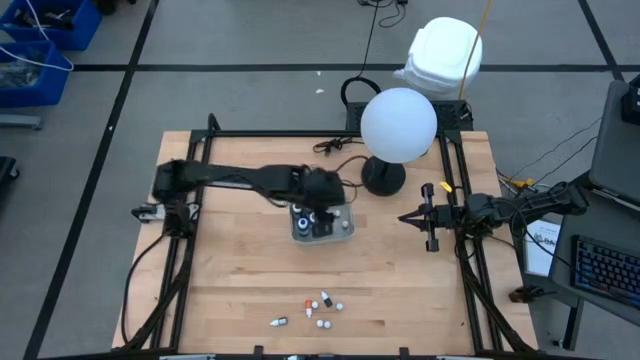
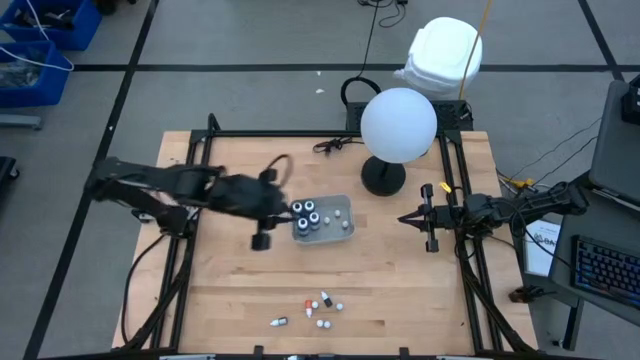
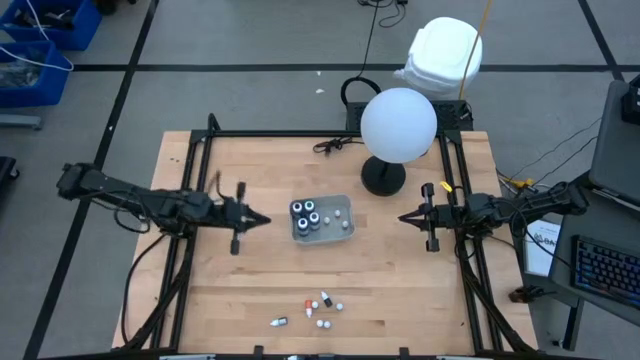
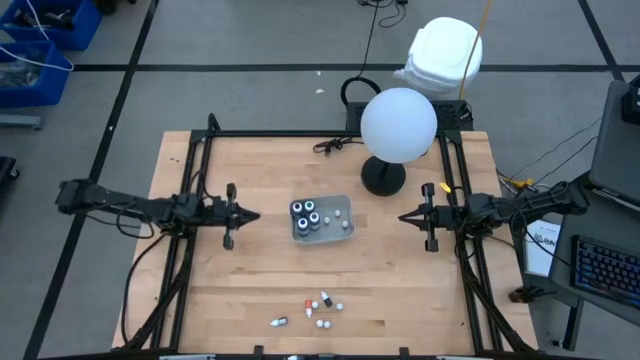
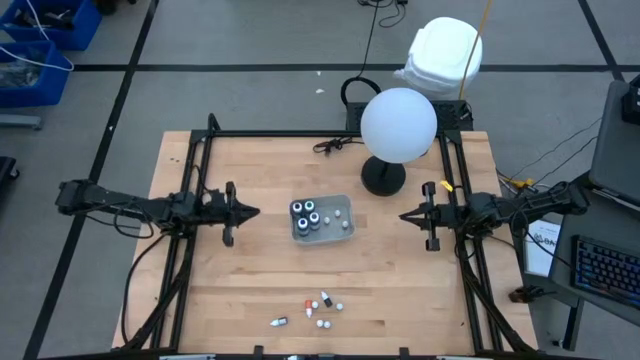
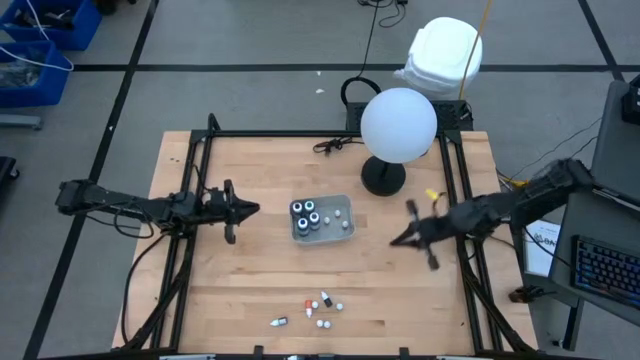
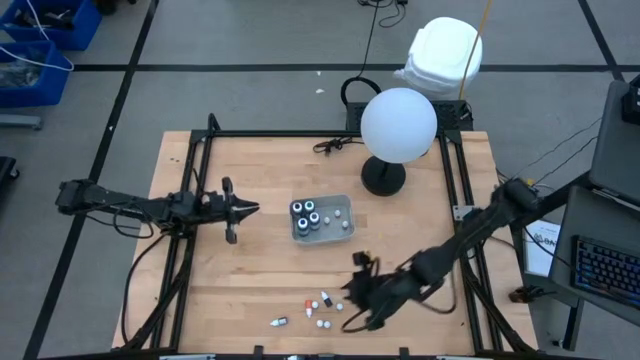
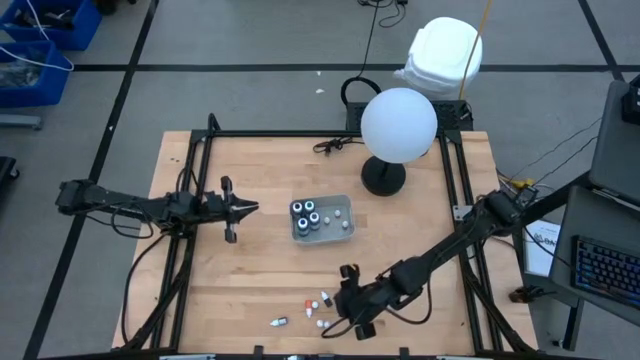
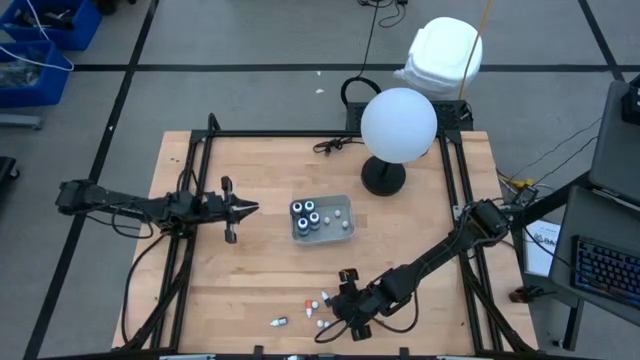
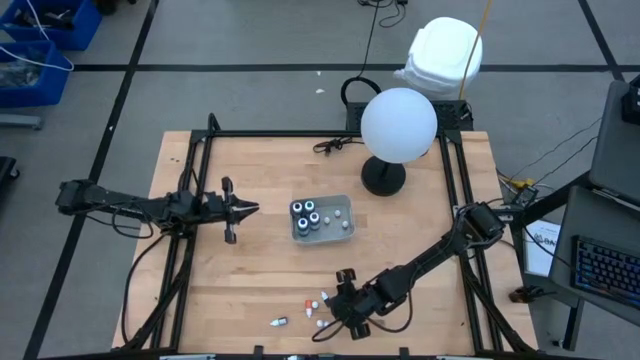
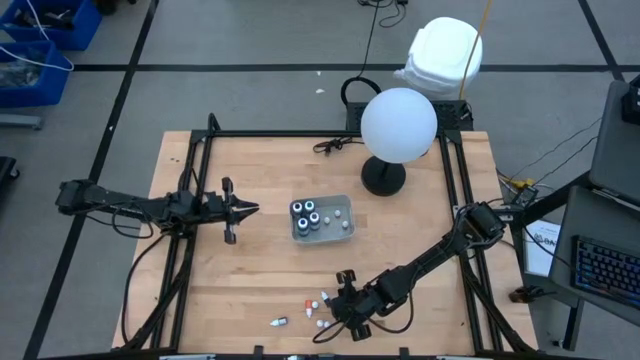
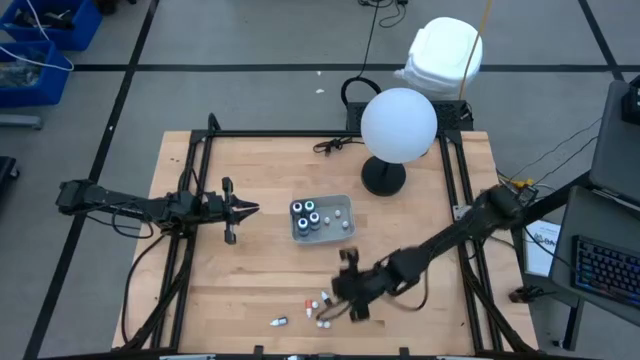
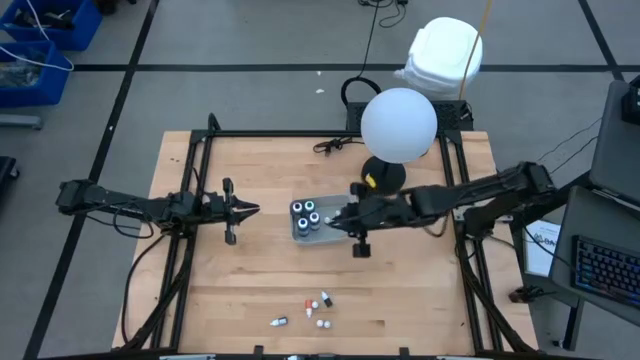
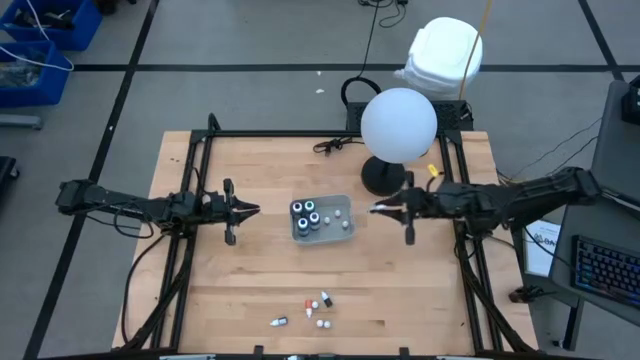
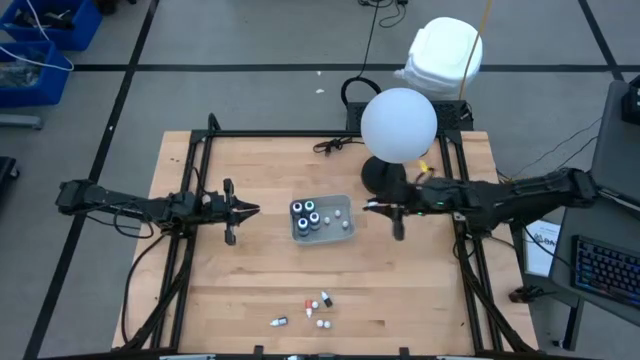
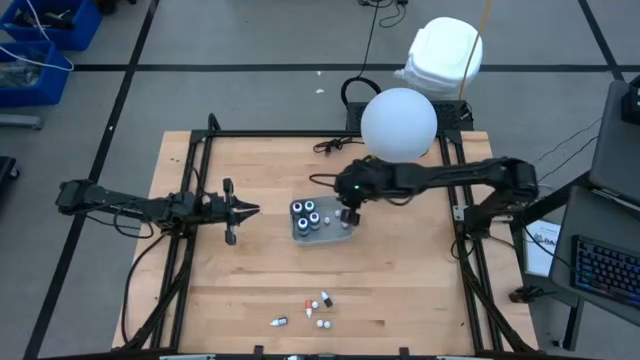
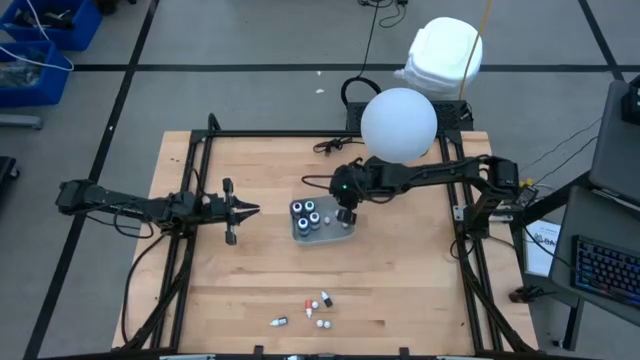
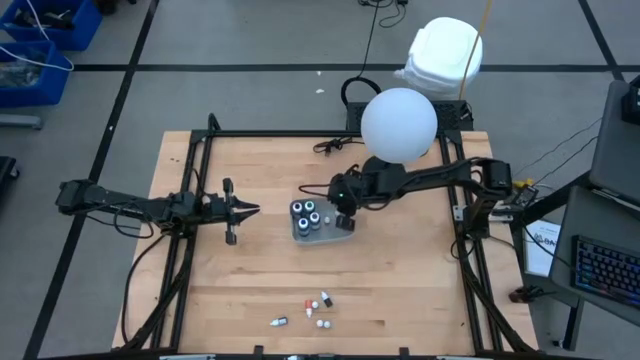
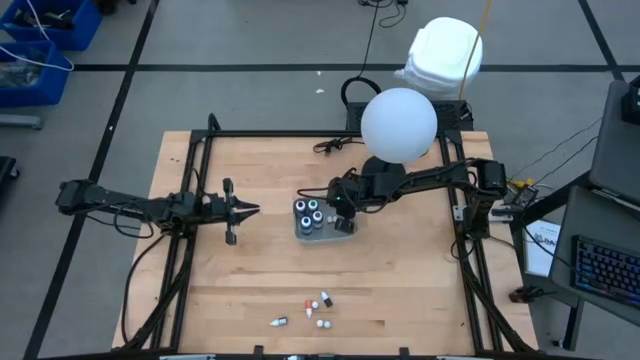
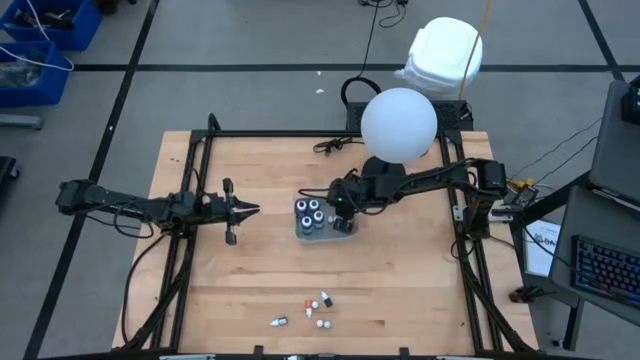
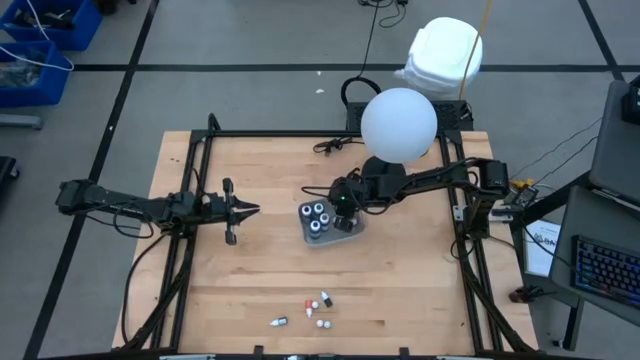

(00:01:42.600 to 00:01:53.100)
Task: Pick & Place food coloring
Put the right small black food coloring bottle into the gray bin

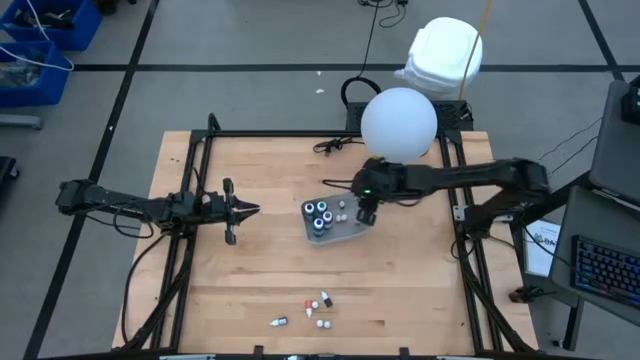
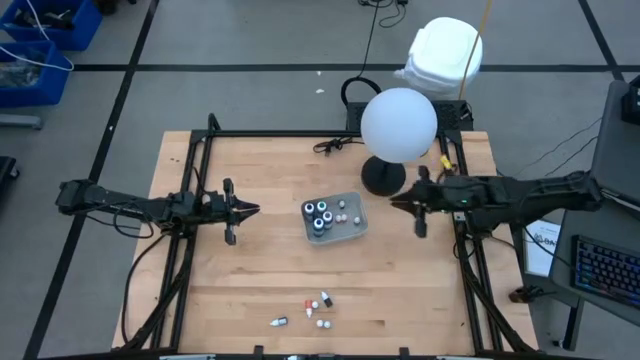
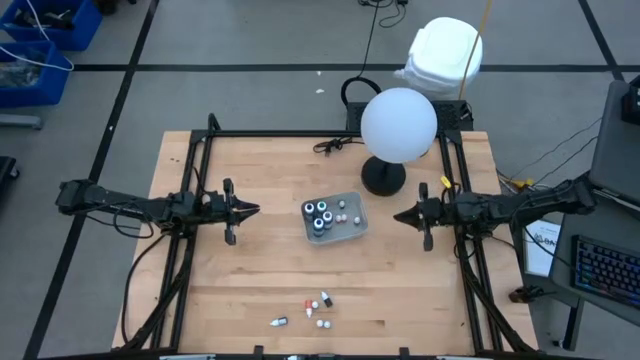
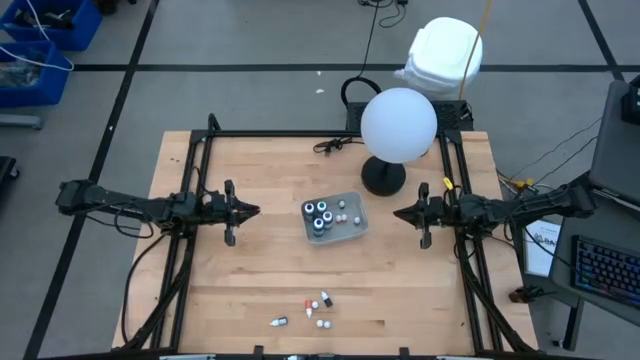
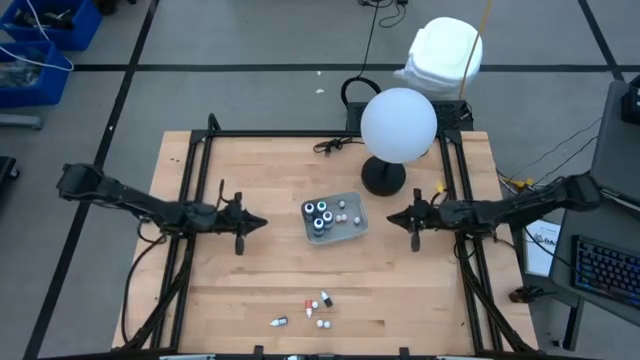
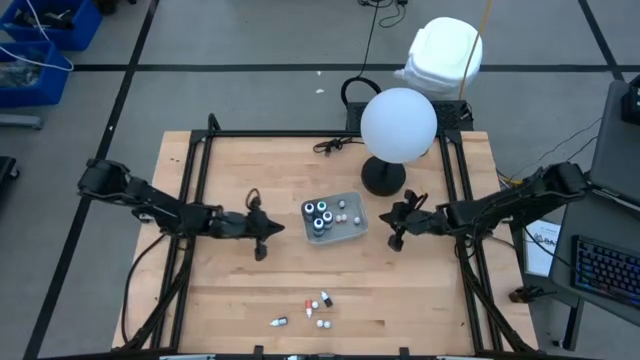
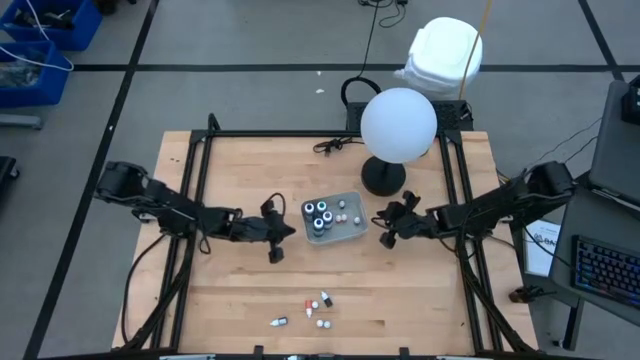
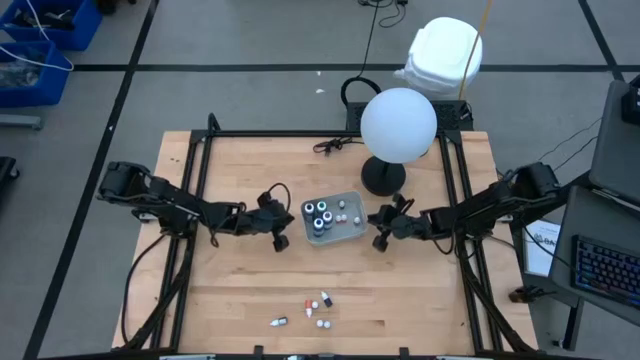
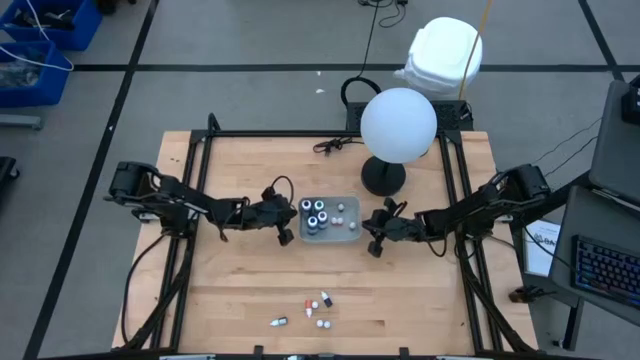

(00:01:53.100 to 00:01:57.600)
Adjust the gray bin

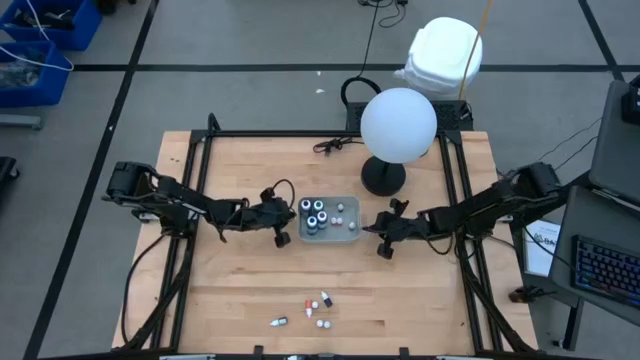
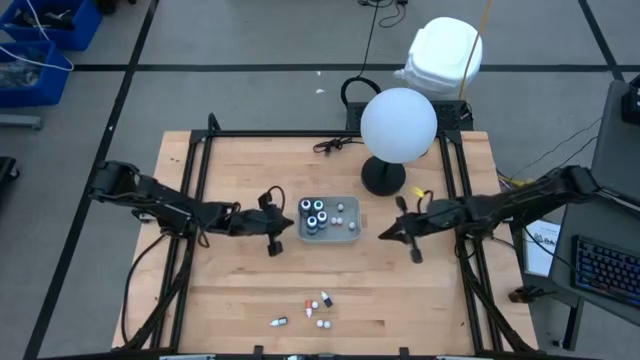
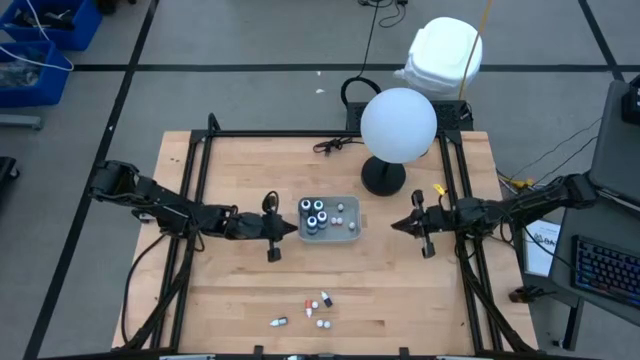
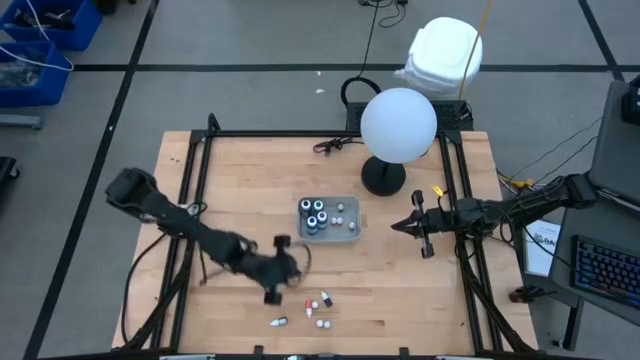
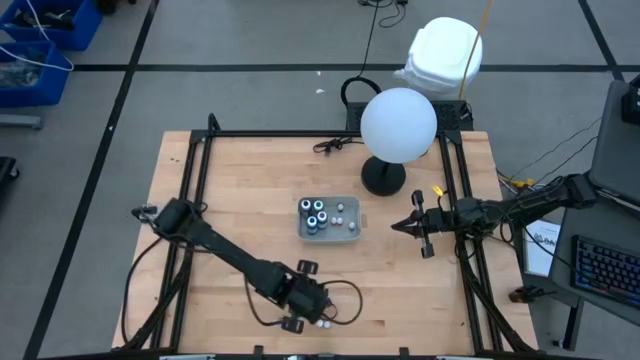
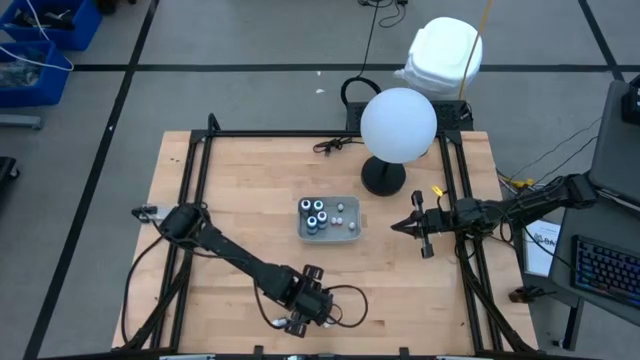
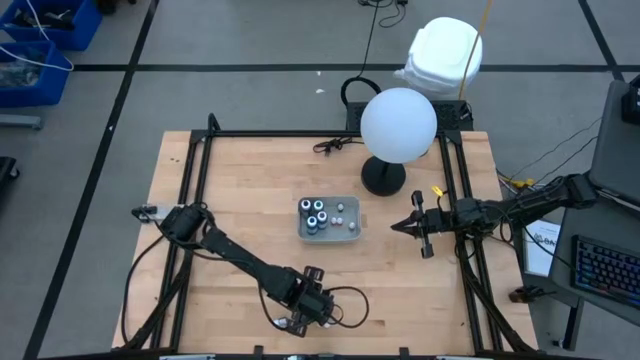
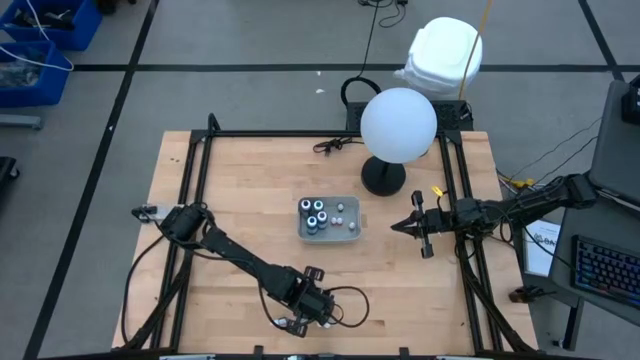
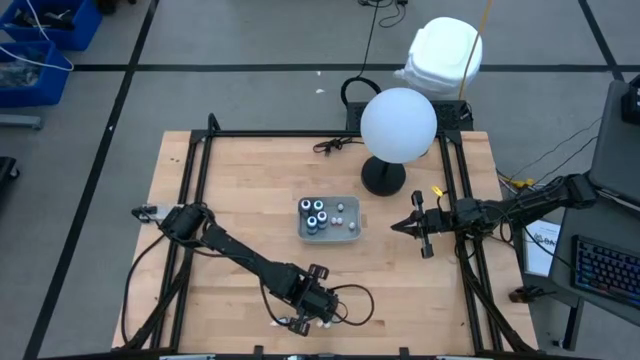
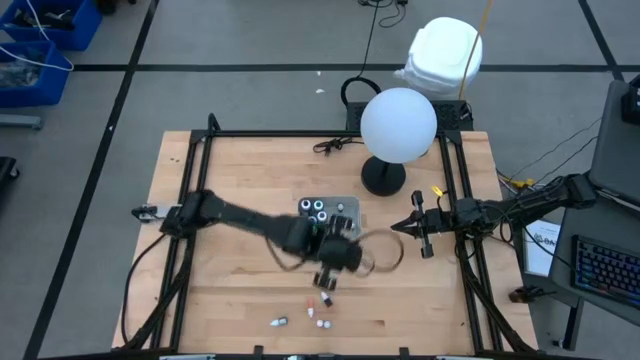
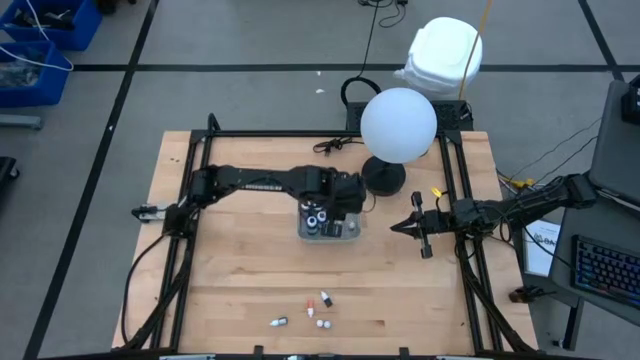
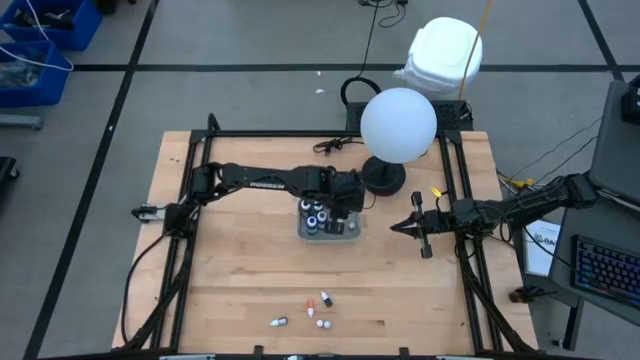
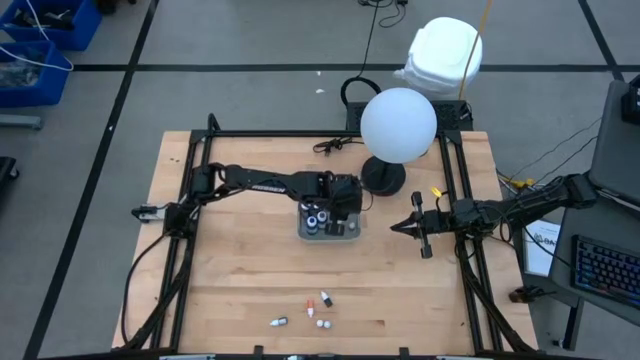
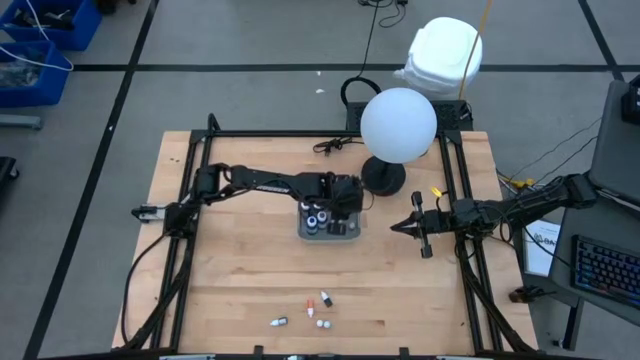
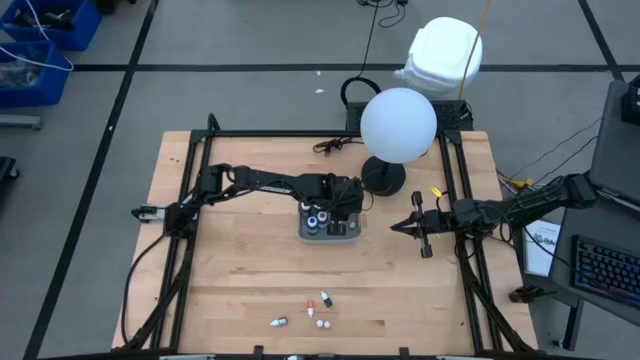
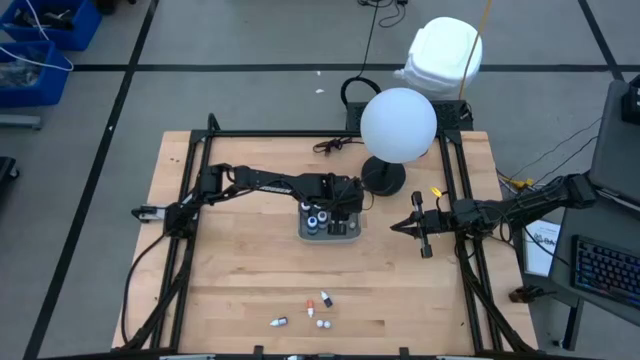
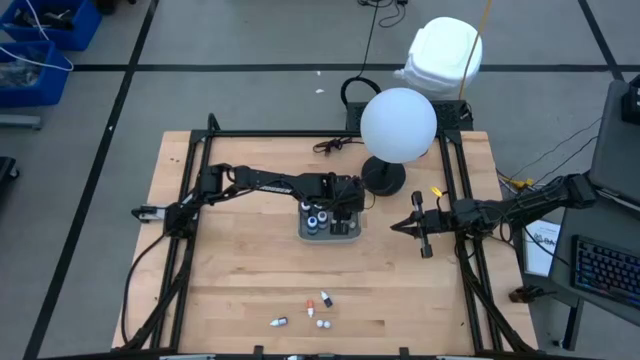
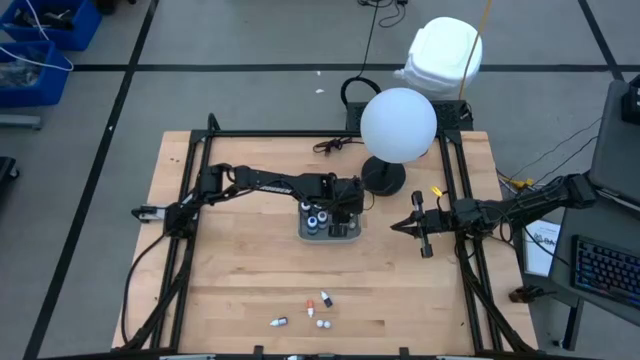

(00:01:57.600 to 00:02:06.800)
Put the left small black food coloring bottle into the gray bin
